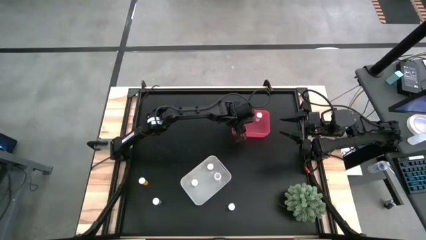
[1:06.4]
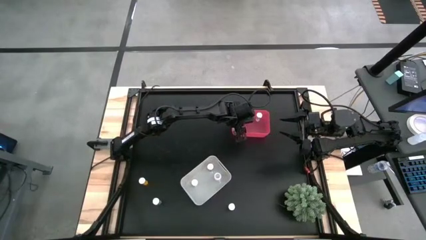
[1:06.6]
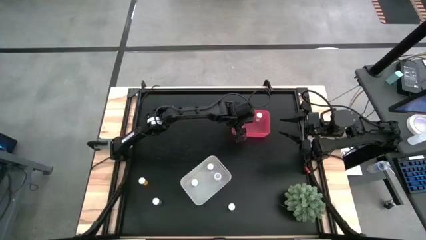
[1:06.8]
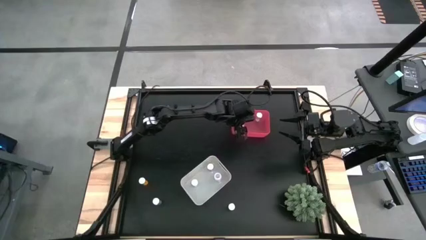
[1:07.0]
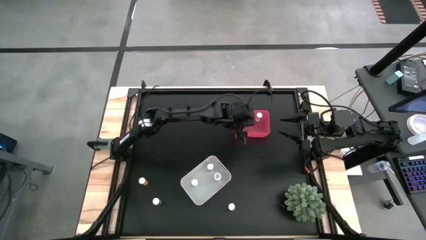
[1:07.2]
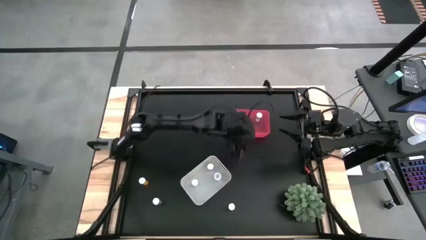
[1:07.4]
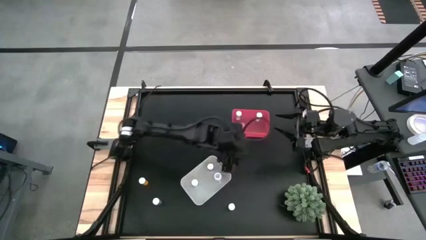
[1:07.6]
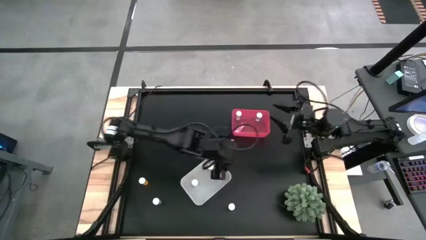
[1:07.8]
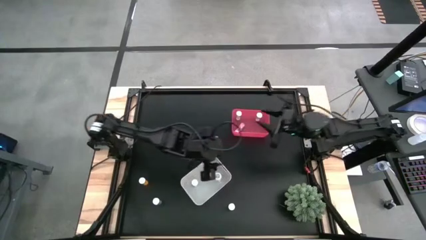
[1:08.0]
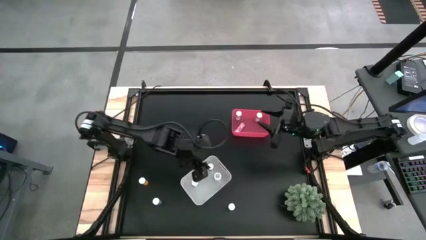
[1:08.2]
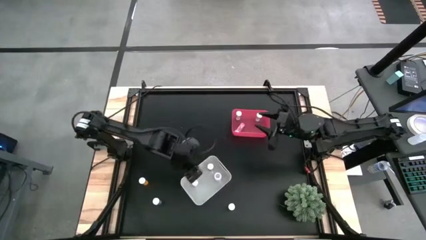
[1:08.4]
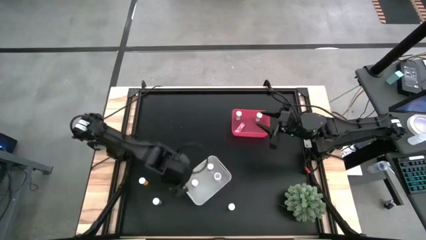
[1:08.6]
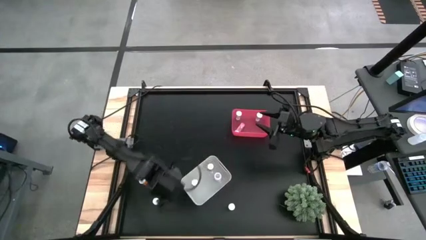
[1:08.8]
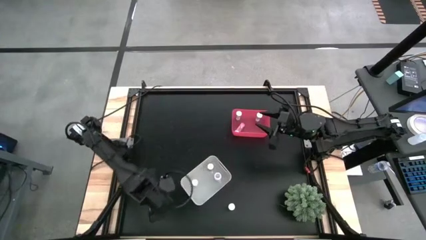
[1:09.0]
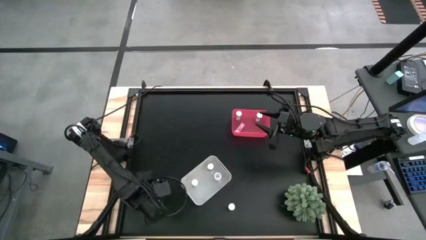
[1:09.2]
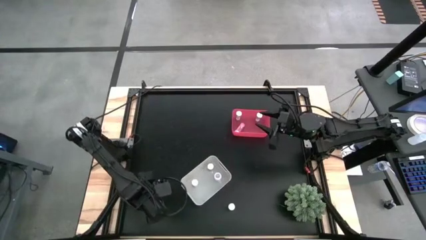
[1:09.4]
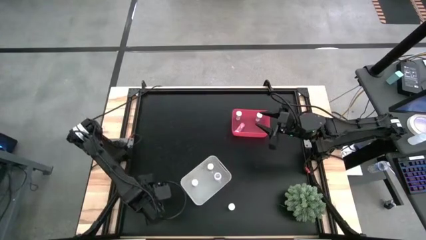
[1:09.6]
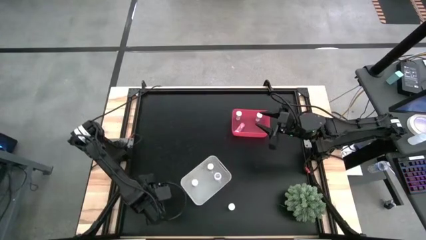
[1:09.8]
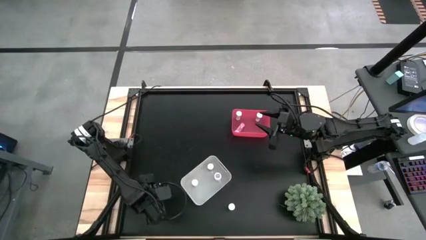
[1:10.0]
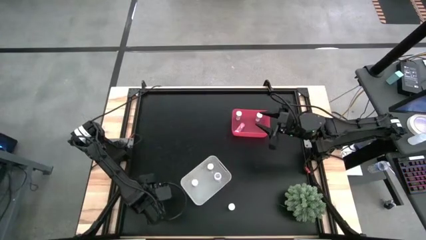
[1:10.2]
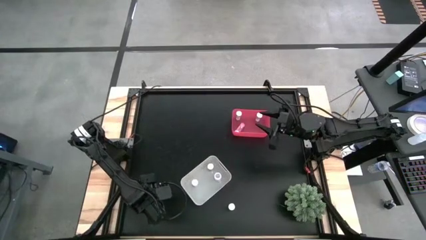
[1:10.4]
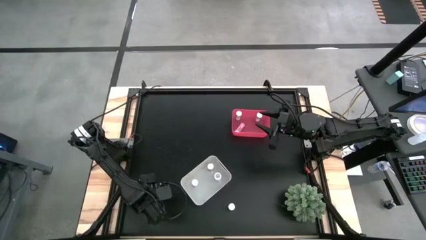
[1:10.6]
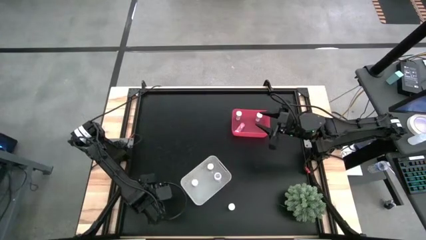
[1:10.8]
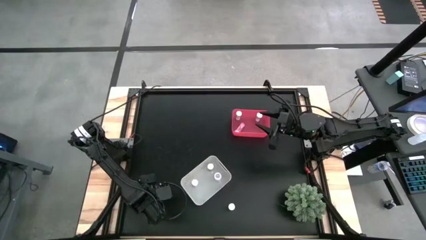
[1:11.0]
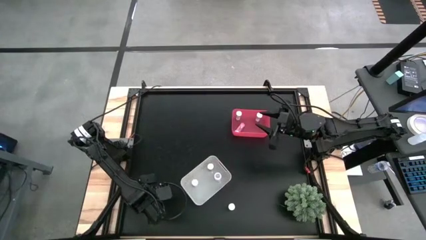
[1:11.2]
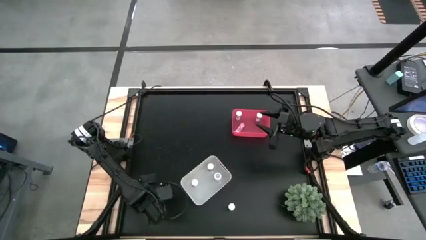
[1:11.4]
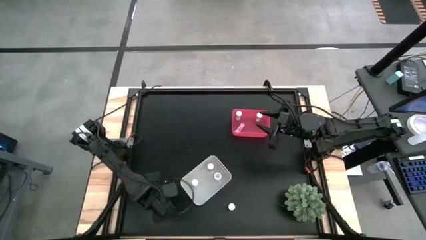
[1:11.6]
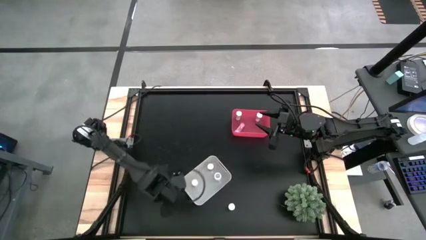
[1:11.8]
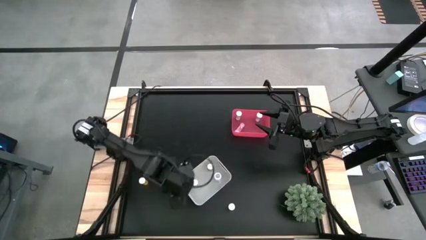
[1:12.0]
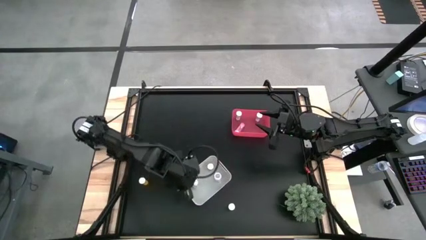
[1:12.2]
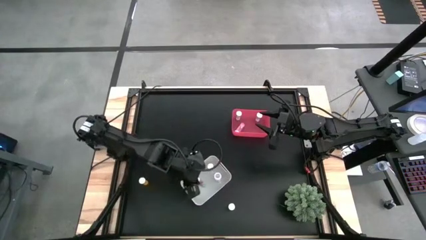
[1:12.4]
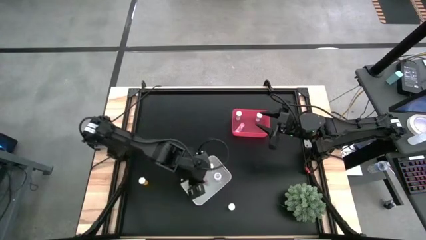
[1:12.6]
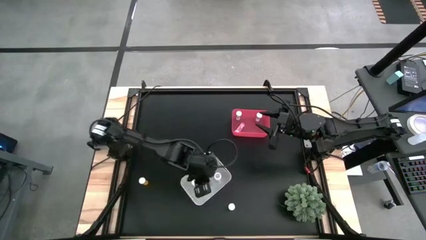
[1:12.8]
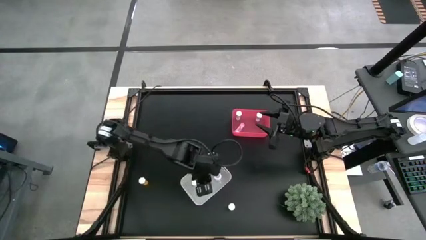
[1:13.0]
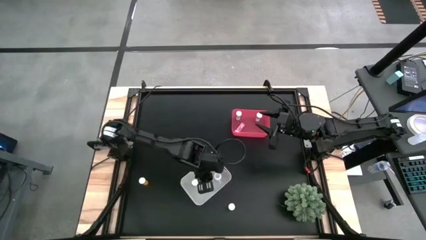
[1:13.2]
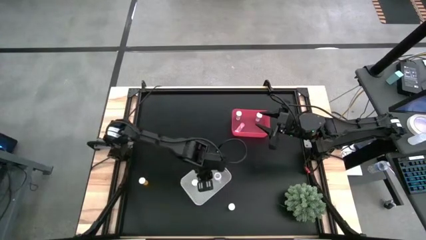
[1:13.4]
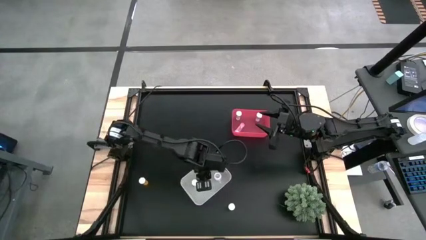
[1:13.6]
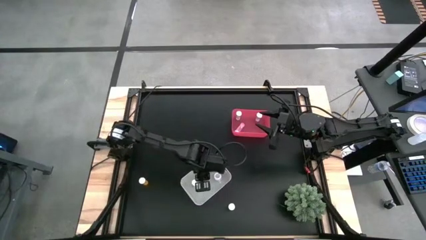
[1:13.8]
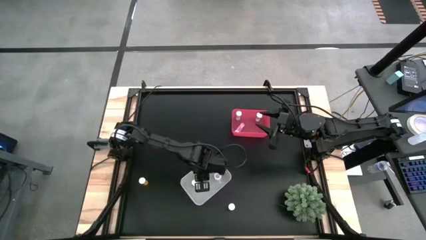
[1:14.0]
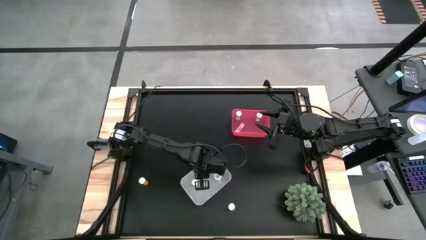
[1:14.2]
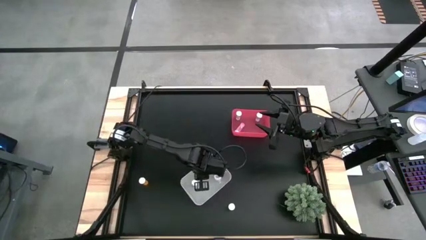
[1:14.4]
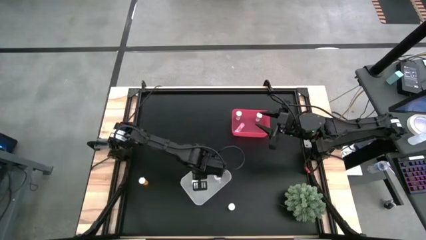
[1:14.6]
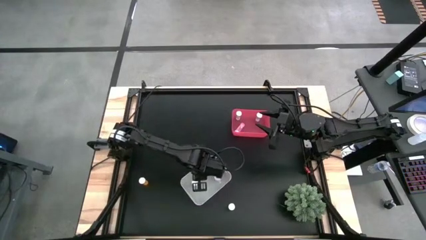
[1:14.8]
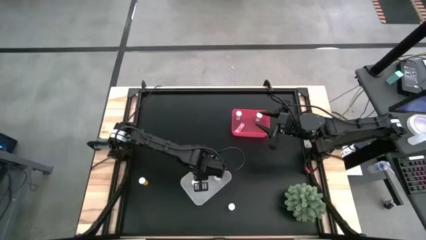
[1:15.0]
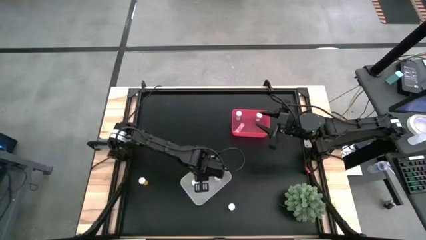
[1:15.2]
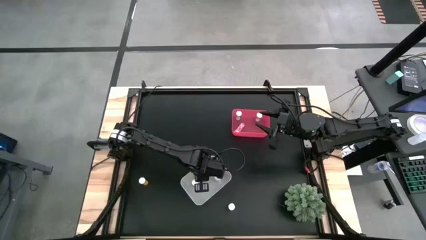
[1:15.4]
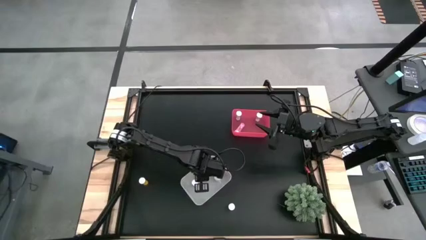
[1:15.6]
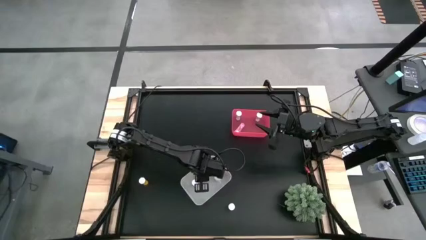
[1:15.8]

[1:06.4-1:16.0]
Task: Pick and place medicine bottles into bin by pill shape (circle, oval)
Put the left blue capsule bottle into the white bin
